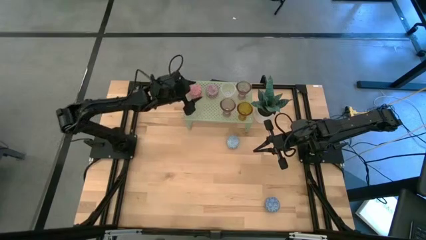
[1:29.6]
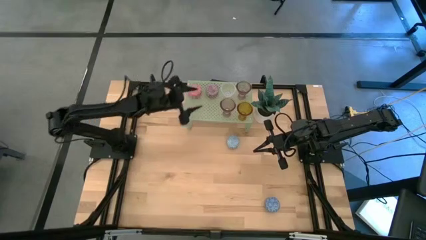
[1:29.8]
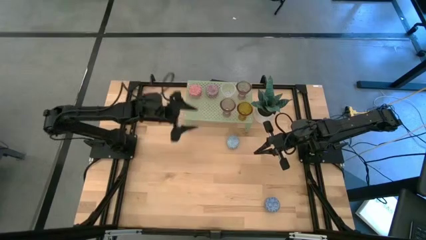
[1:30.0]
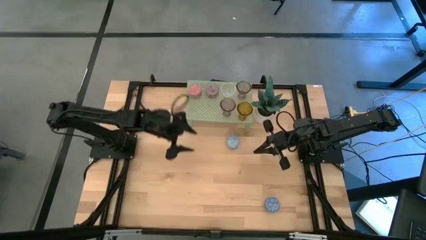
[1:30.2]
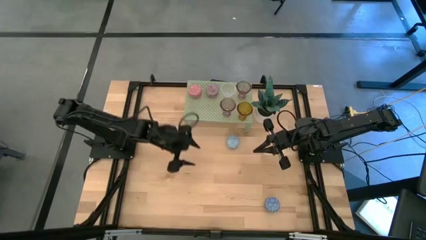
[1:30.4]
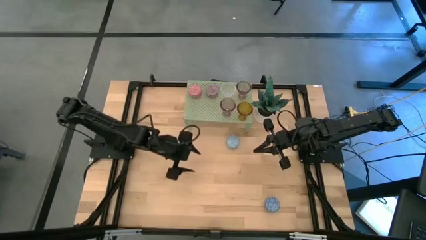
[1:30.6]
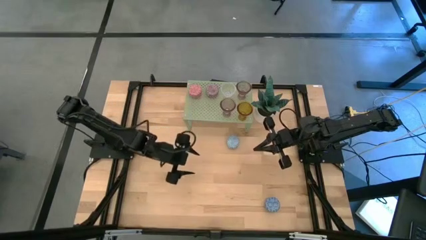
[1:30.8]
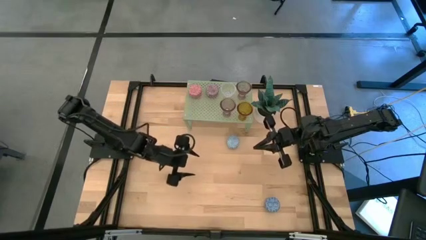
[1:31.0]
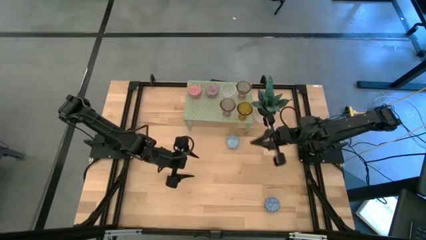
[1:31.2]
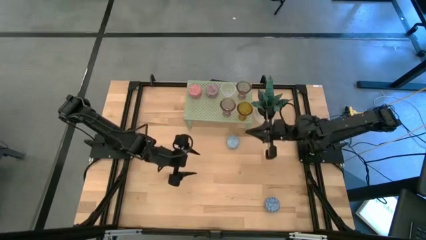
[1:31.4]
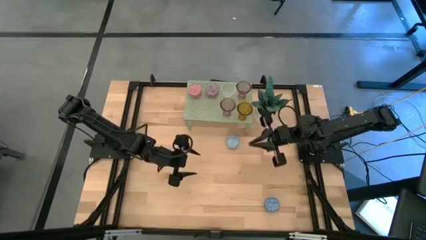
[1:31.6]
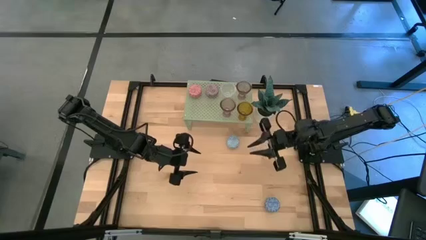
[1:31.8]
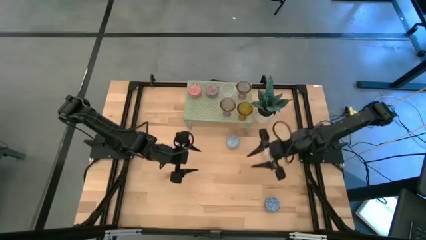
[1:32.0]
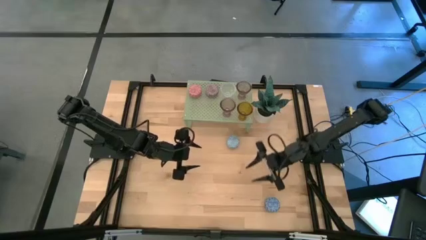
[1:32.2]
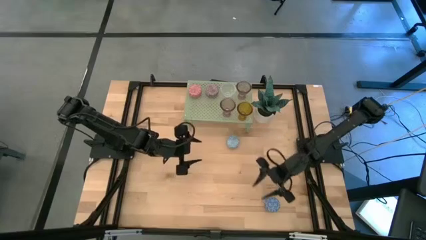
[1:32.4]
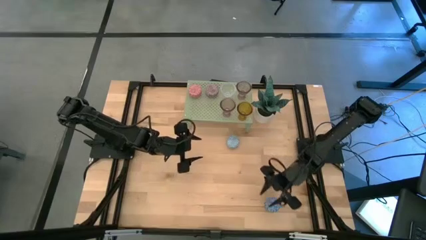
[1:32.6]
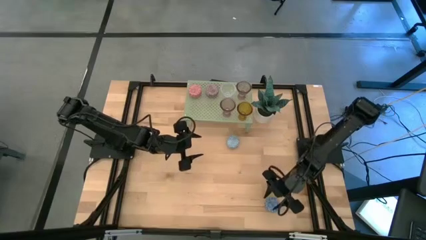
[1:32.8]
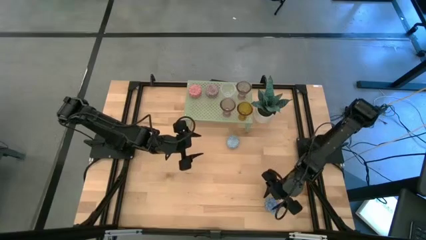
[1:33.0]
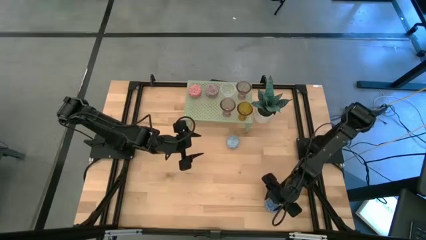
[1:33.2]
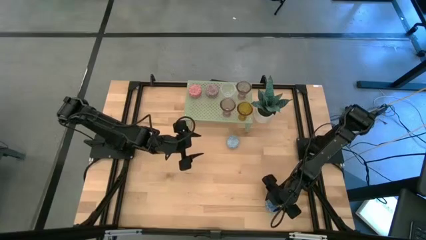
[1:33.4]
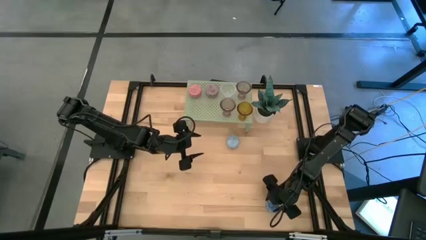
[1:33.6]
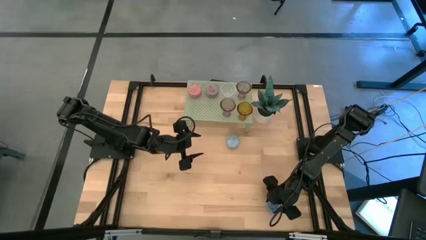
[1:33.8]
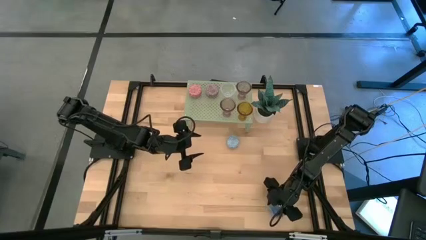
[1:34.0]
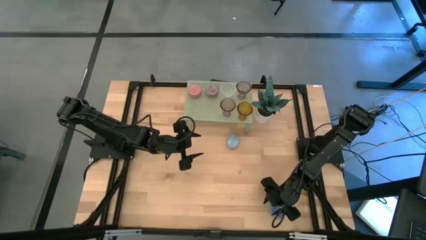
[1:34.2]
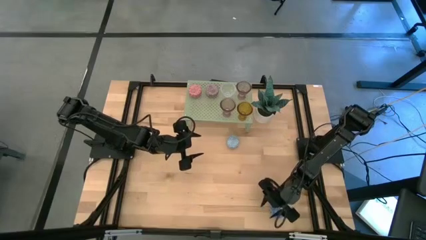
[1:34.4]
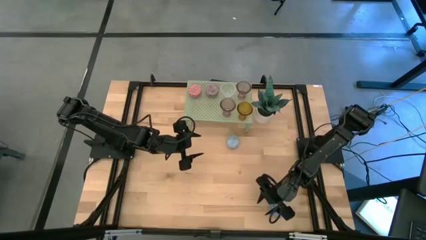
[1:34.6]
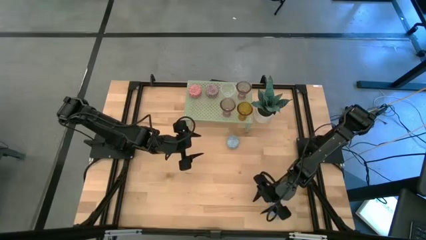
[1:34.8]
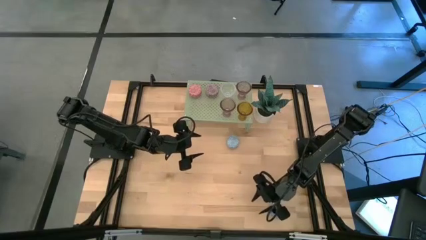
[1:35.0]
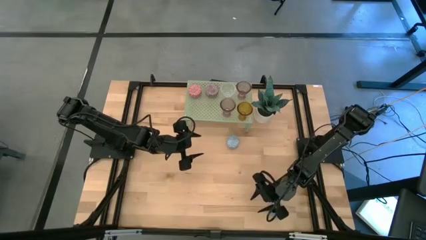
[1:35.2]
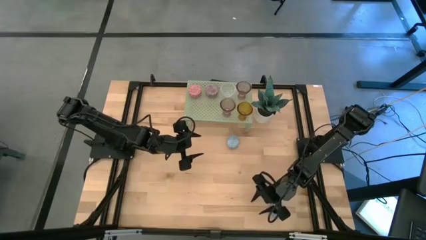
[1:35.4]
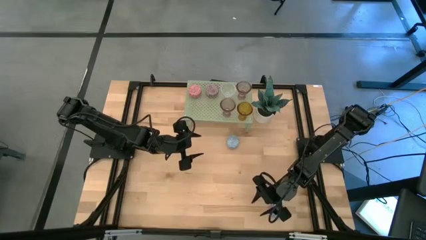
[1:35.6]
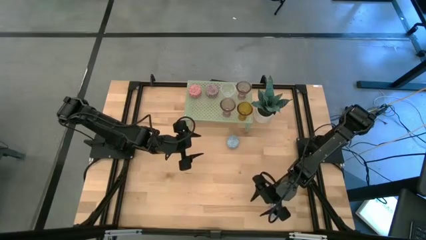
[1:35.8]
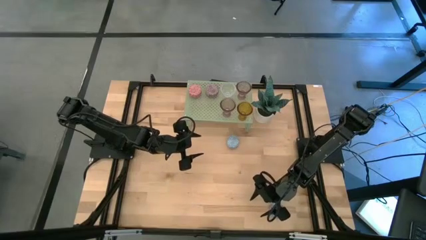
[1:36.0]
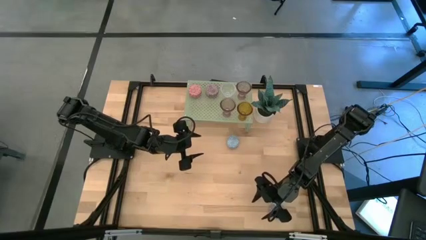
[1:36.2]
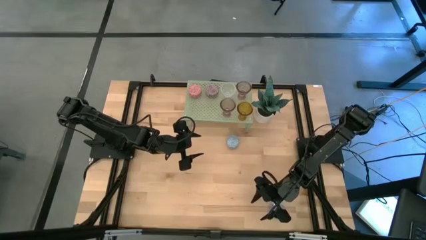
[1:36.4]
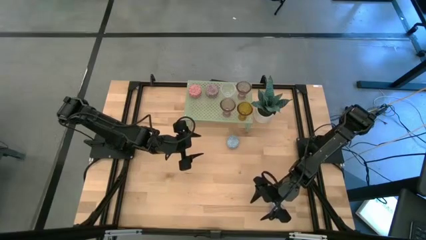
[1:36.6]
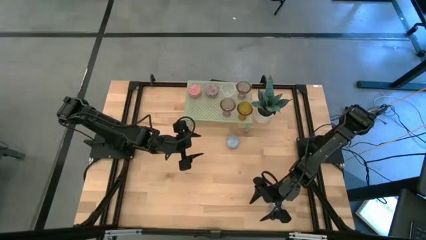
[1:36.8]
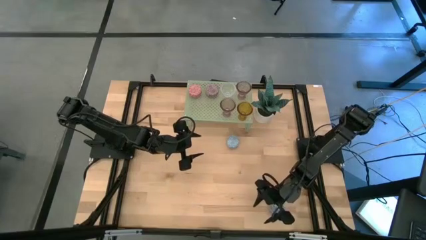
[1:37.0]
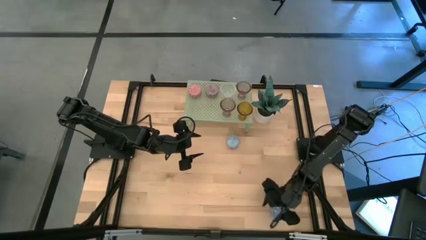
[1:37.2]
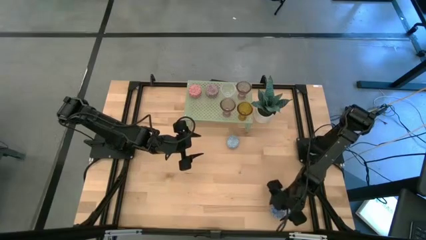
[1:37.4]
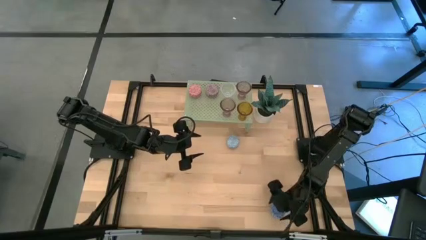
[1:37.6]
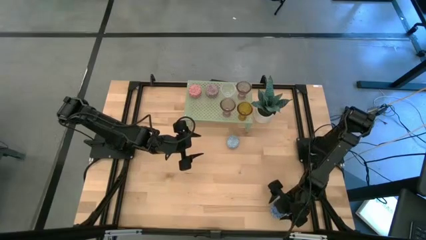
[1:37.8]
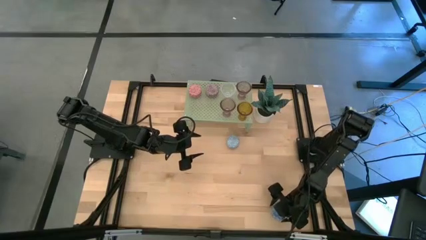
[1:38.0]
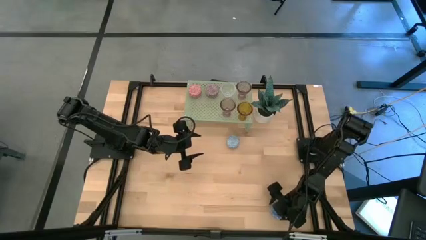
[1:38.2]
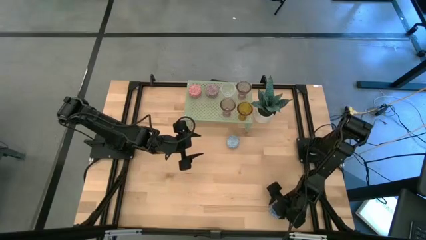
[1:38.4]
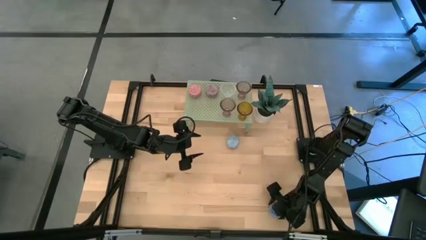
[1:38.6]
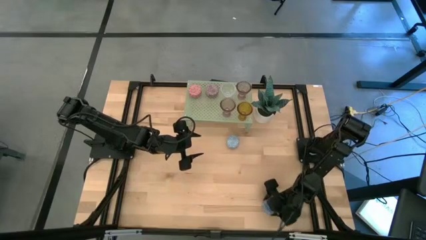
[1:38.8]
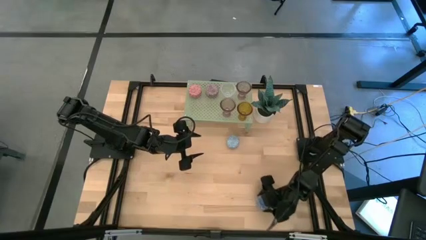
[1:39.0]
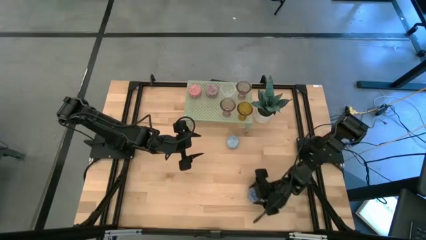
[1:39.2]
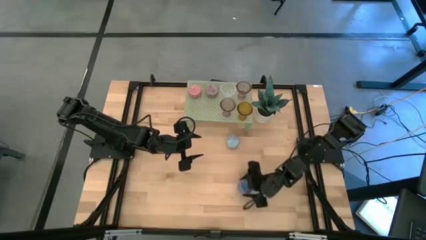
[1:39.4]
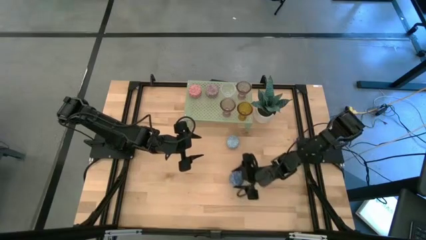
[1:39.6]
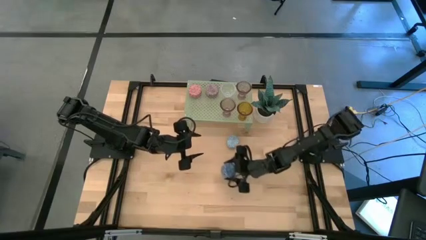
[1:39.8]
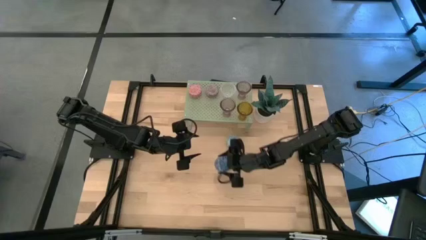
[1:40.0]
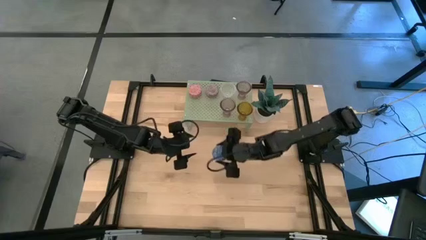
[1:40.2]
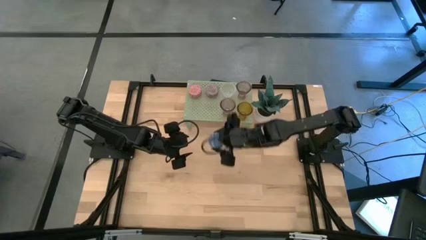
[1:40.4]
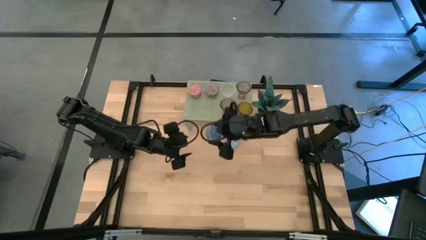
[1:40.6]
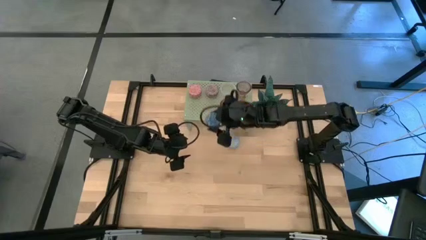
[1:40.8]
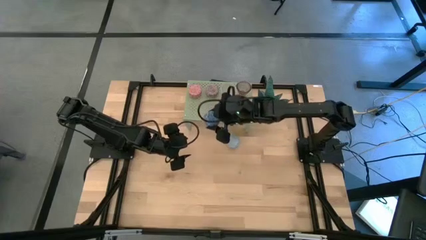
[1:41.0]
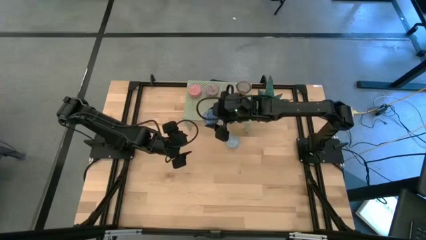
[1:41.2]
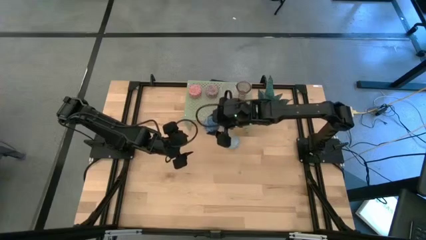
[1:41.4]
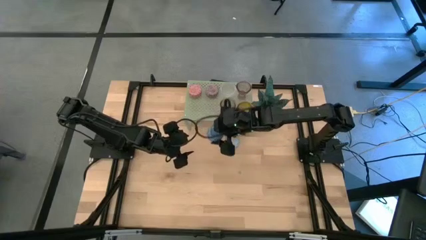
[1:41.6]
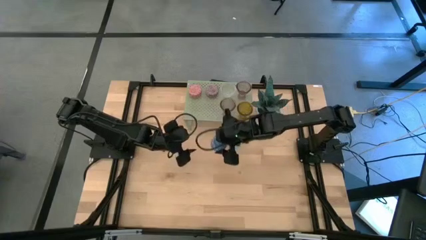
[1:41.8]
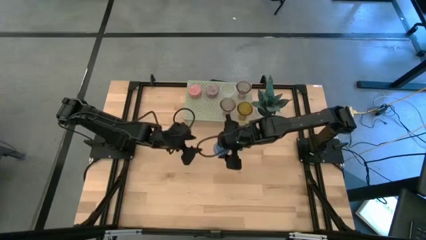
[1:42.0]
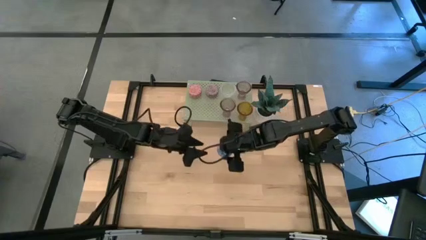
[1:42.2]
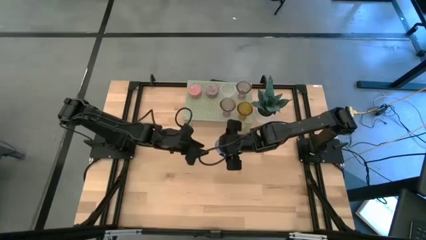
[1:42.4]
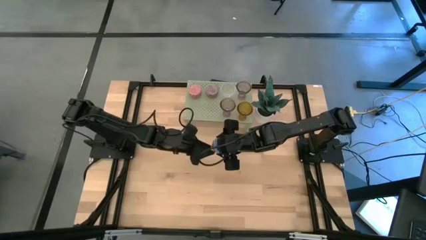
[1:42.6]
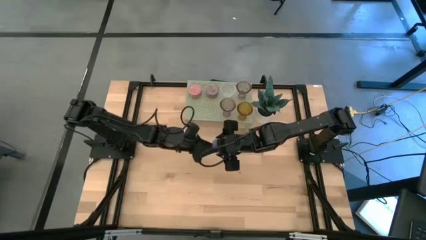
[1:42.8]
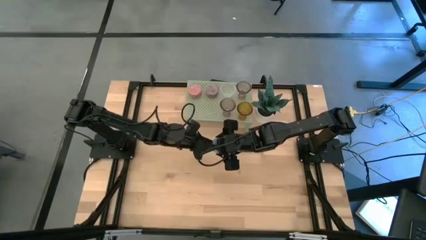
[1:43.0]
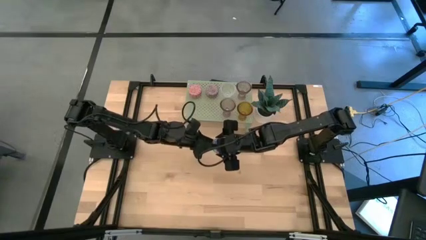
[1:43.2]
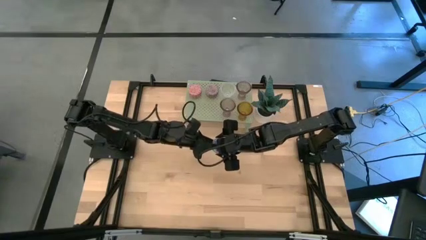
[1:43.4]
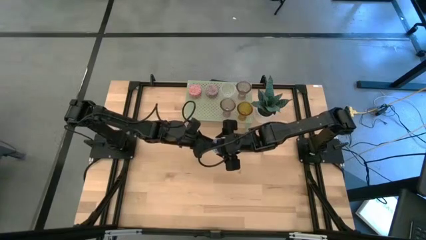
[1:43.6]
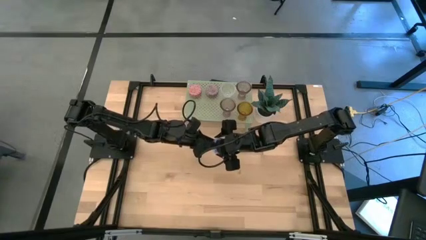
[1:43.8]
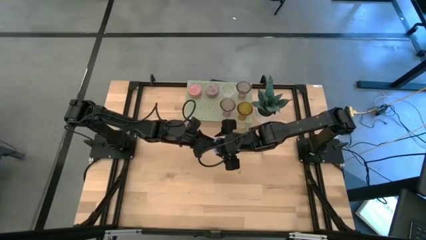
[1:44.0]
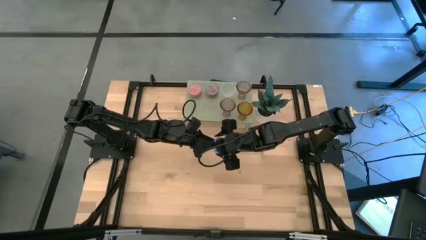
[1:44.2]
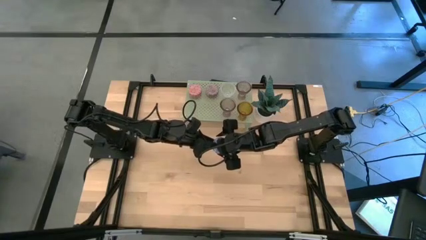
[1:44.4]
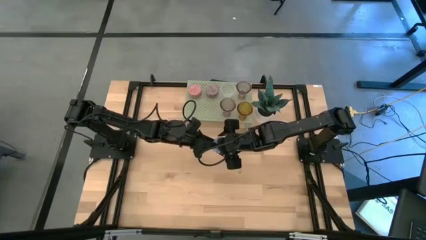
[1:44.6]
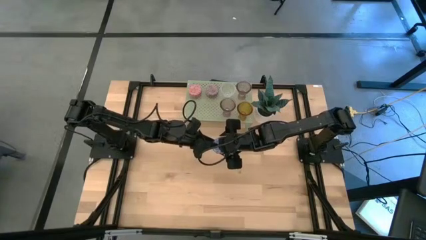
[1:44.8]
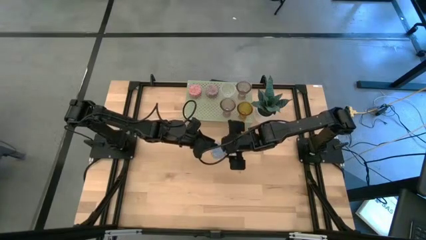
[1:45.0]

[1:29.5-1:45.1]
Task: Pick & Place candle stick holders
Align the blue scented candle with the purple scented candle on the shelf

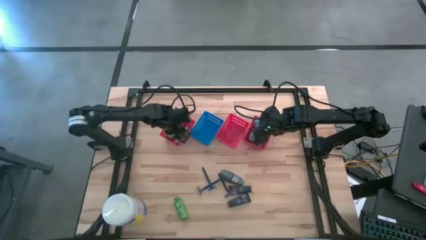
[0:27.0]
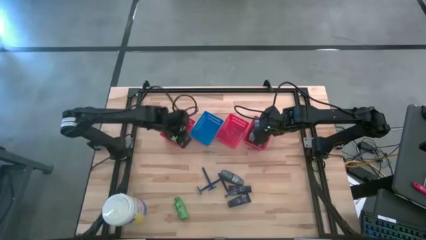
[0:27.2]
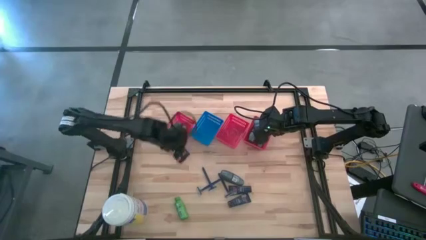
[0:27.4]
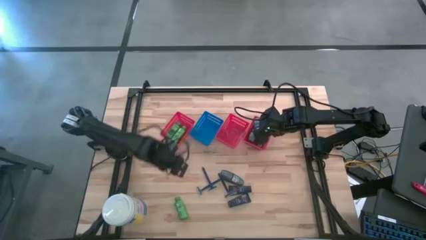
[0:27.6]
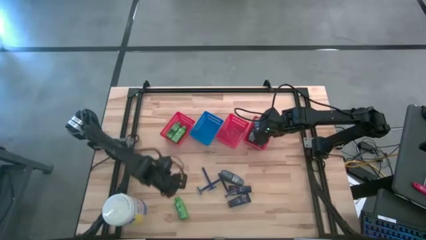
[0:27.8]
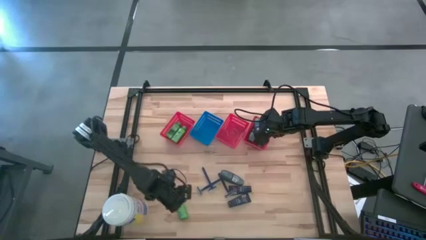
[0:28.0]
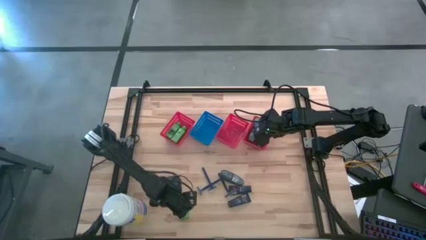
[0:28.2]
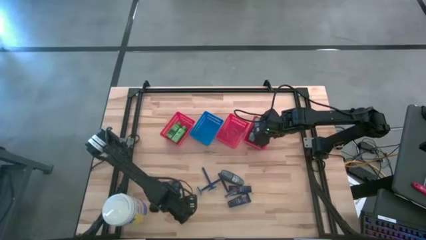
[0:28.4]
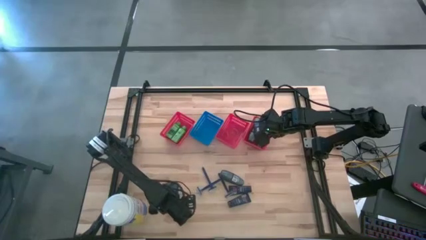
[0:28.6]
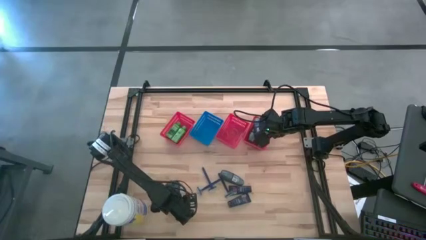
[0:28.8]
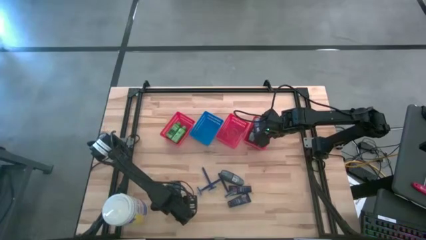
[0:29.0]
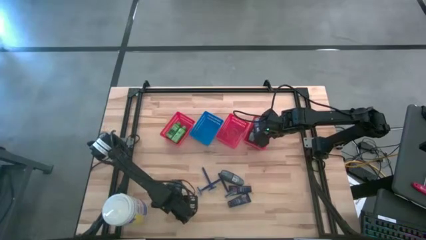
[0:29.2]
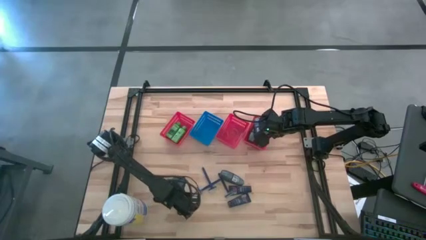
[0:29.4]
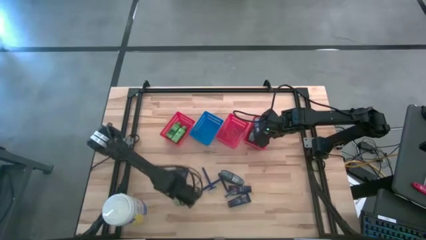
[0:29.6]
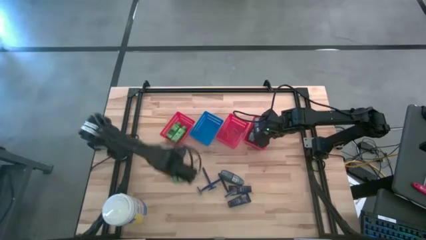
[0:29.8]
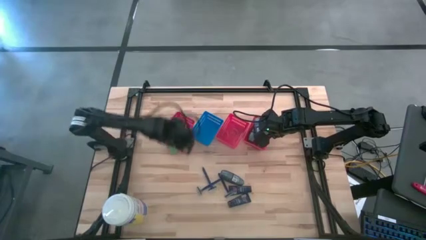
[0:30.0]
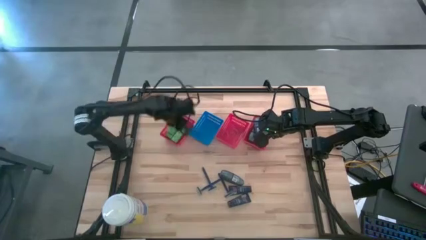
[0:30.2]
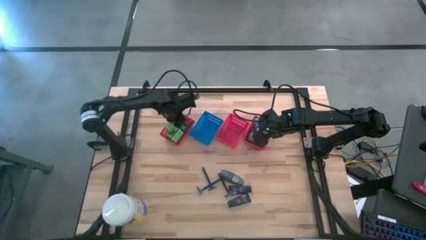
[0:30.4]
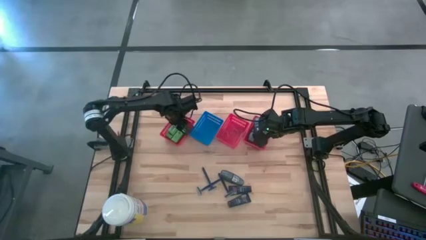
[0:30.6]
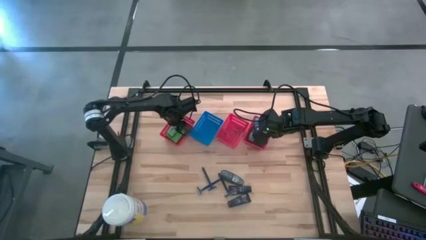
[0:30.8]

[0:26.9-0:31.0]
Task: Pick & Place Travel size toiletries
Put the green shampoo into the left red bin
